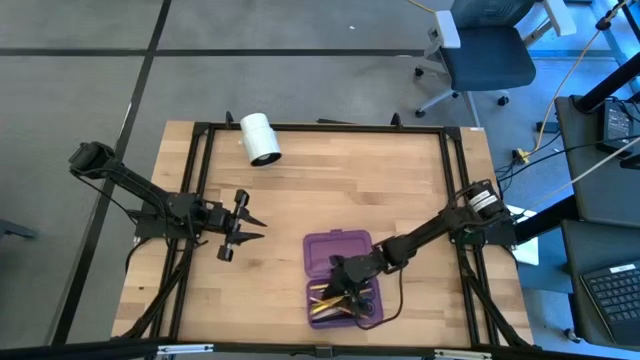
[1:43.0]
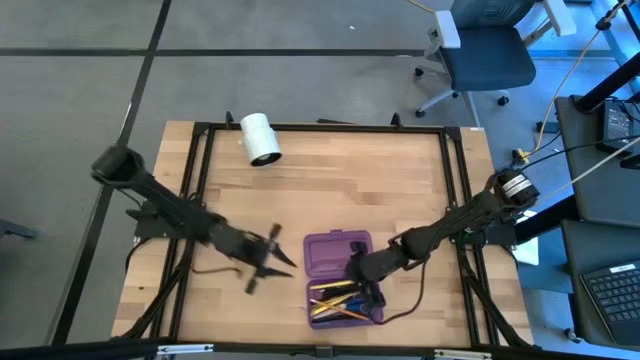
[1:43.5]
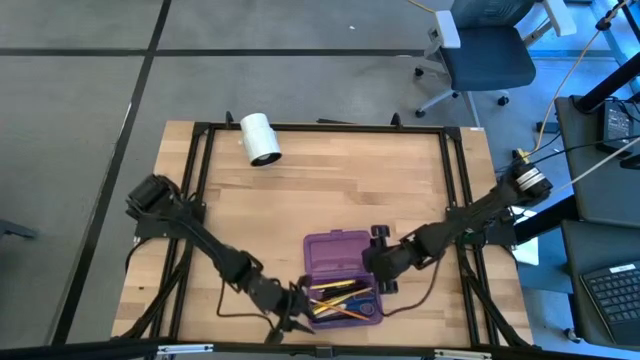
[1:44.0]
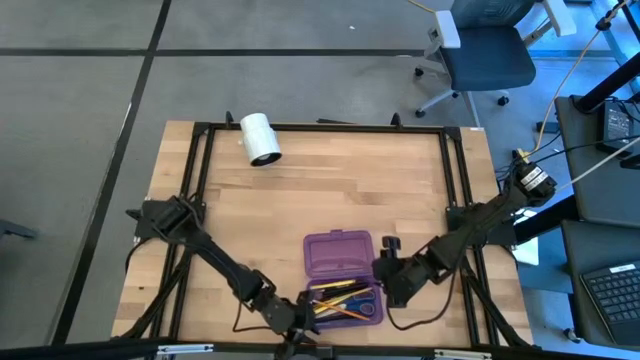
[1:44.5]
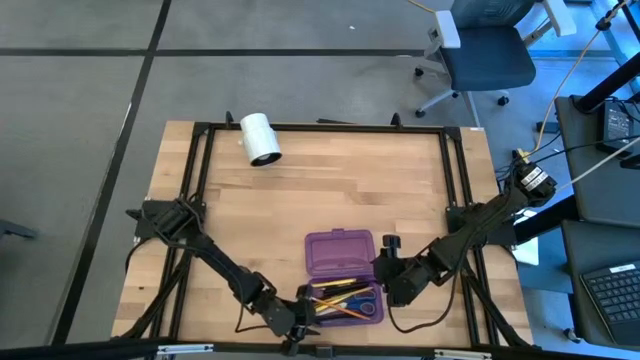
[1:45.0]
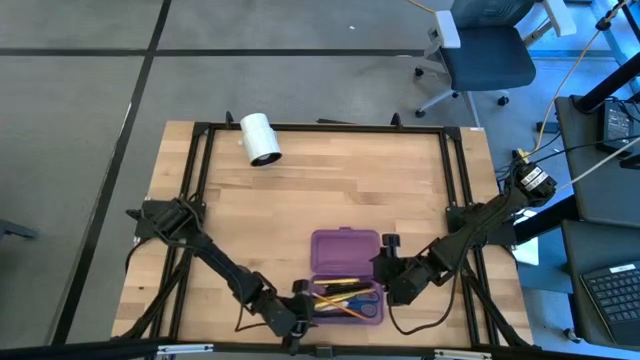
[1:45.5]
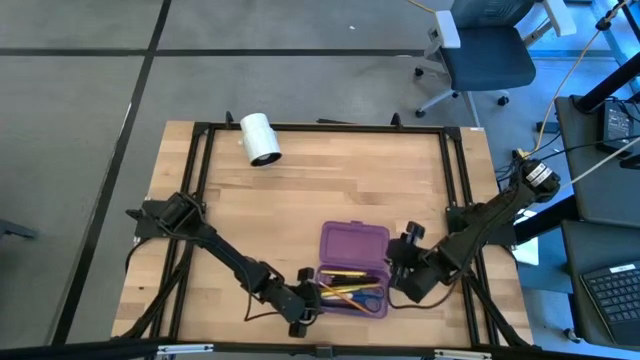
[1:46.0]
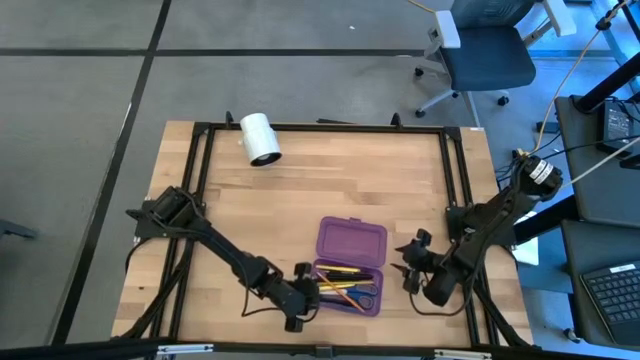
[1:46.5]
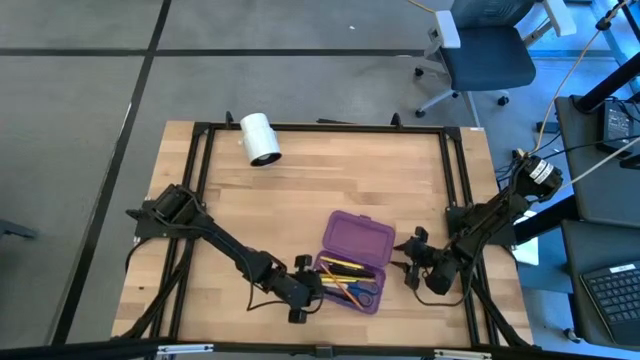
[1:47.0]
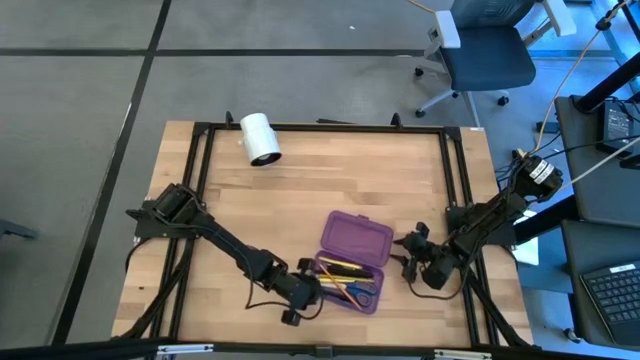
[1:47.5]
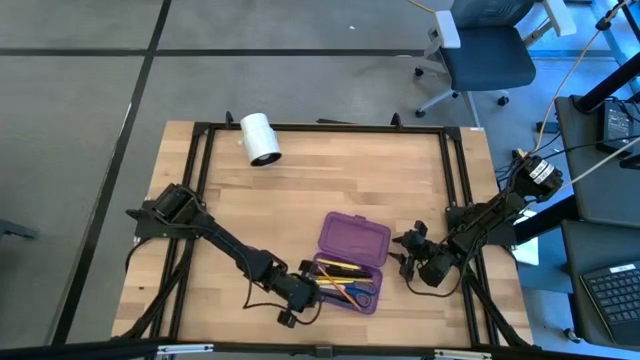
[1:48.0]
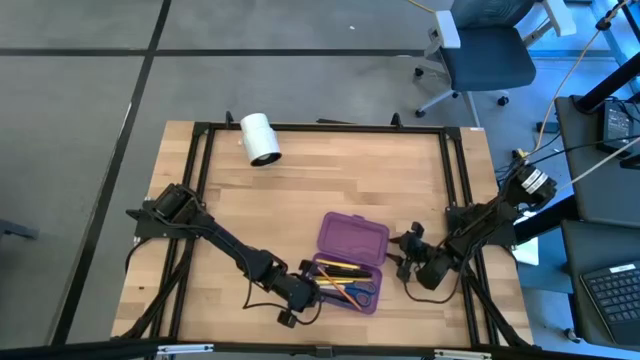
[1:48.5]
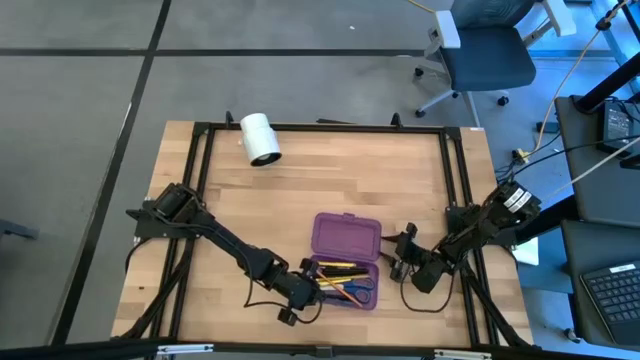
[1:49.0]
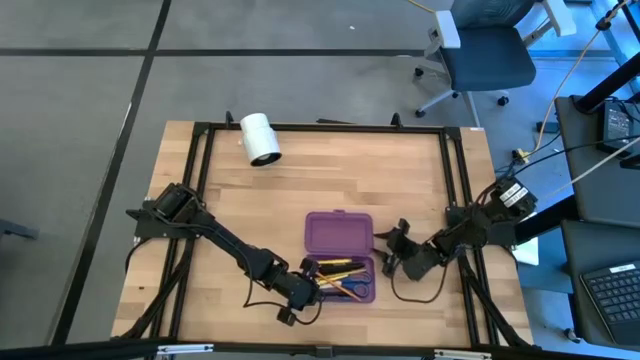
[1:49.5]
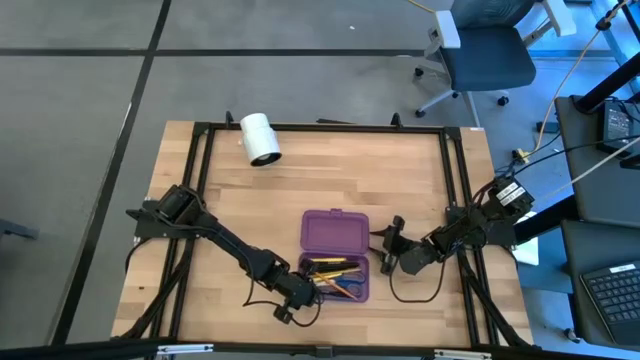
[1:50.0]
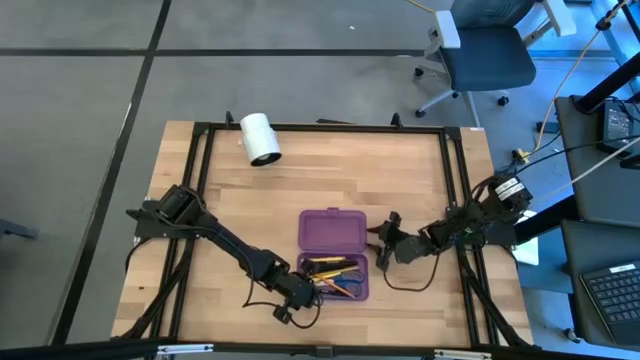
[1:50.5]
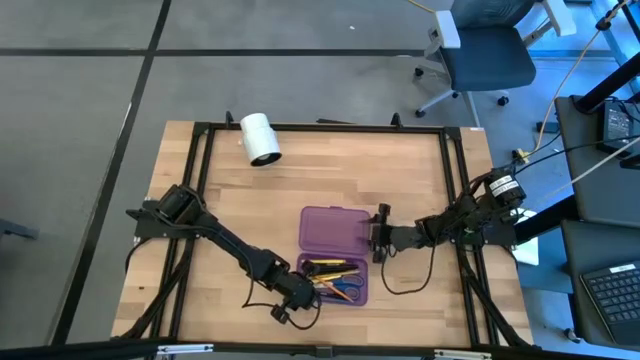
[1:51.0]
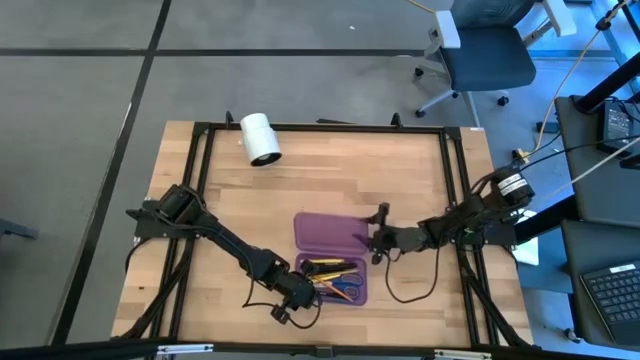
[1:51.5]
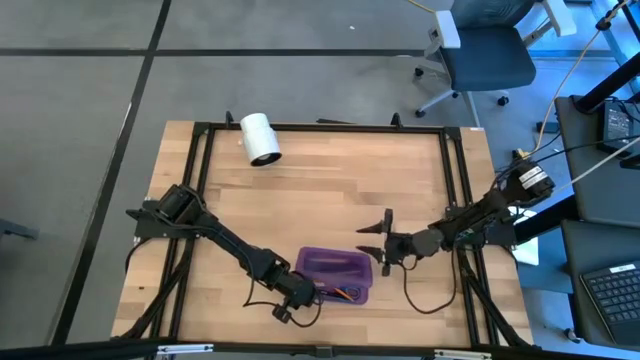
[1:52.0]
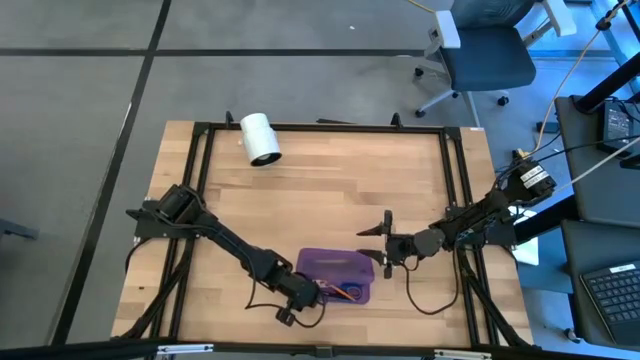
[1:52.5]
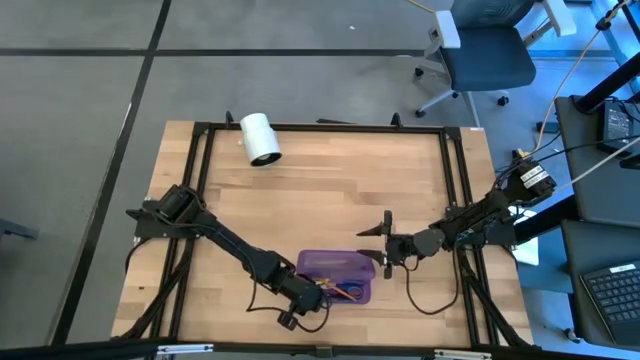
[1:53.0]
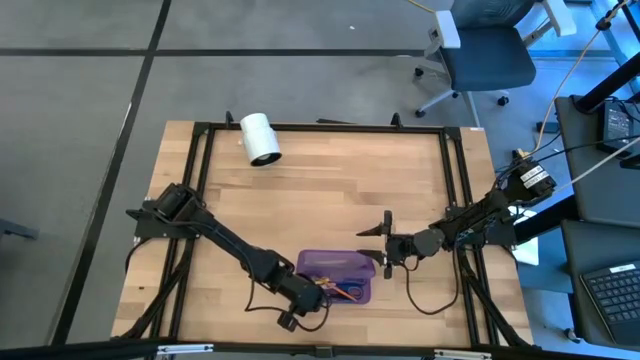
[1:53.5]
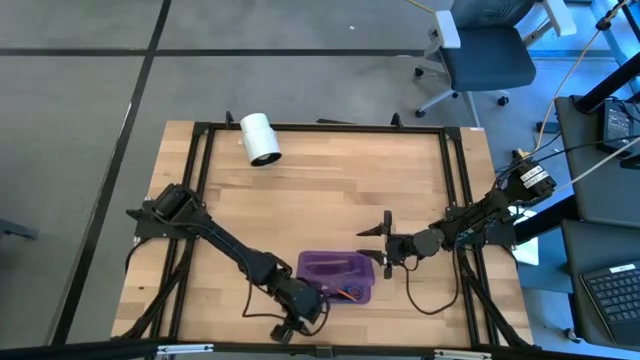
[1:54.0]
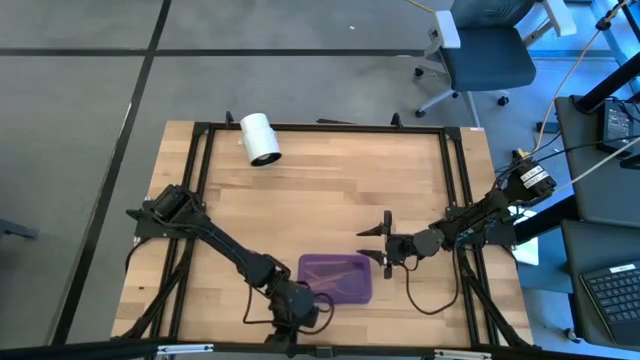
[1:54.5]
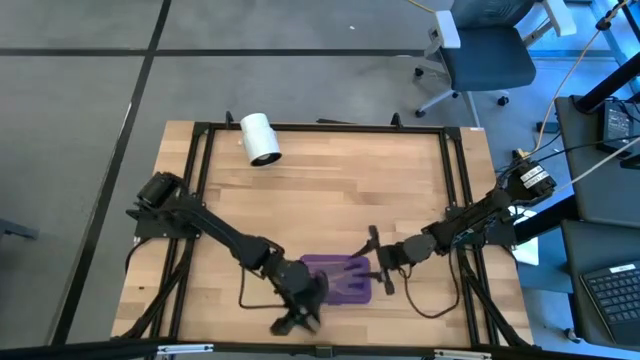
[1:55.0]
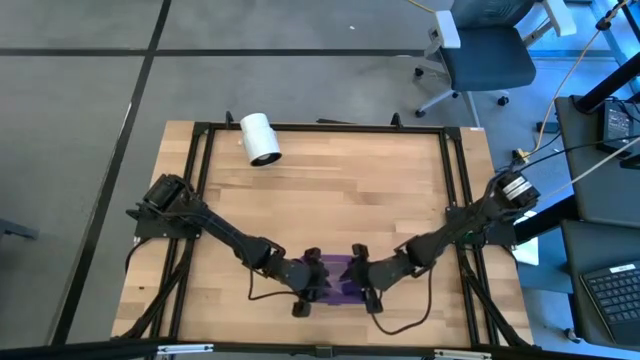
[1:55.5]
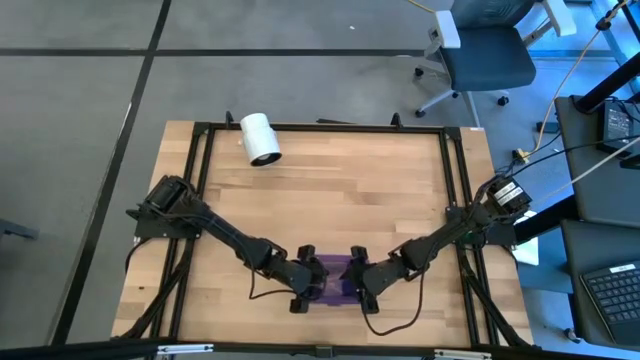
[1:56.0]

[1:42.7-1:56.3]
Task: Pick & place school supplies into a supply box
Close the purple supply box

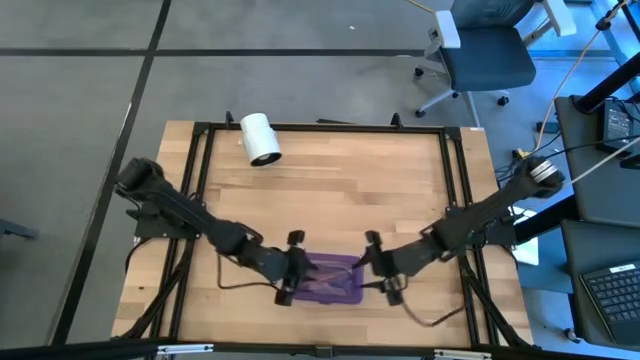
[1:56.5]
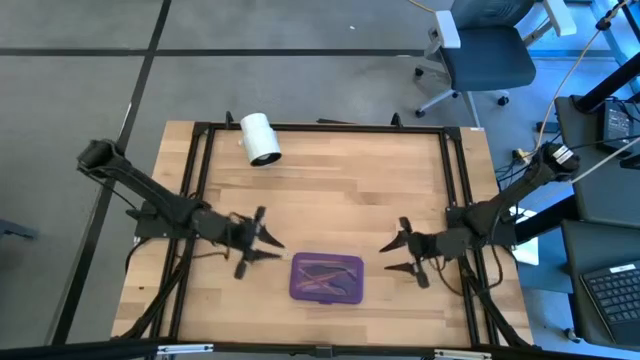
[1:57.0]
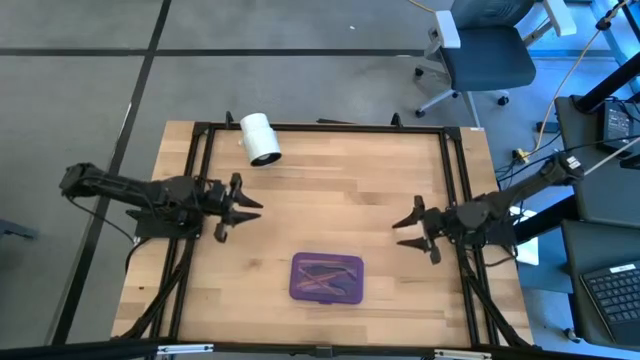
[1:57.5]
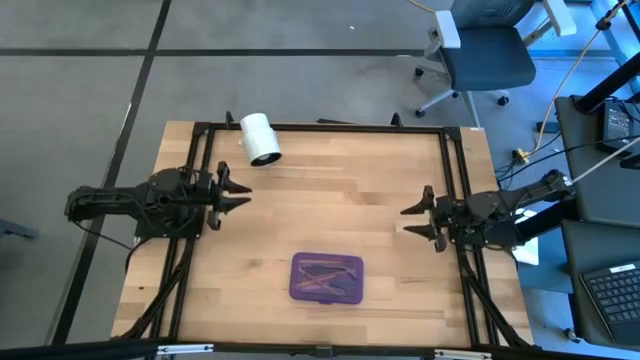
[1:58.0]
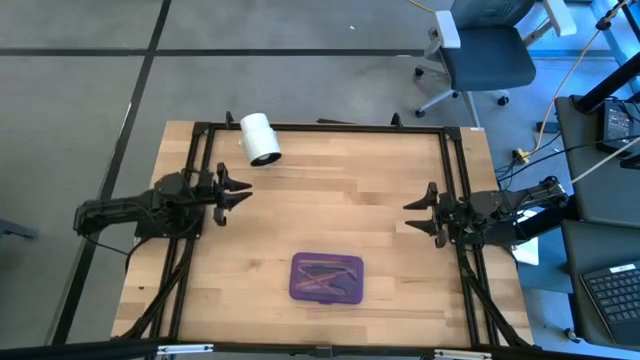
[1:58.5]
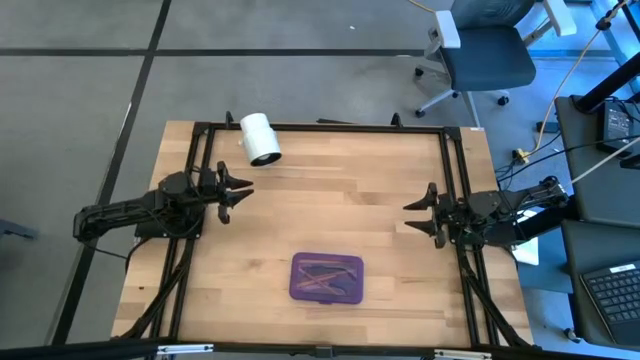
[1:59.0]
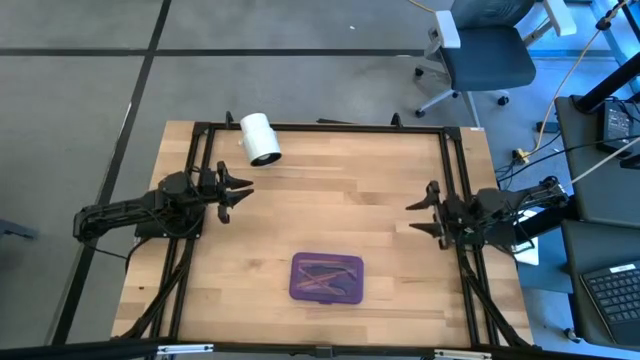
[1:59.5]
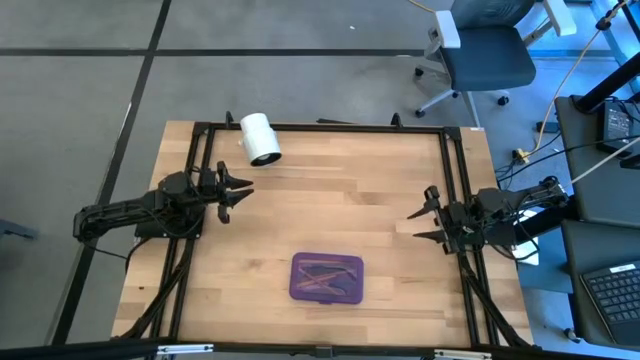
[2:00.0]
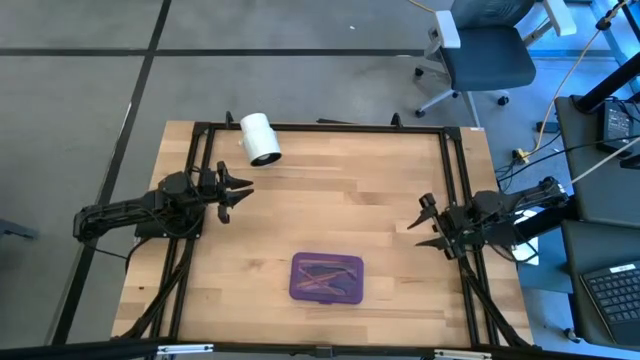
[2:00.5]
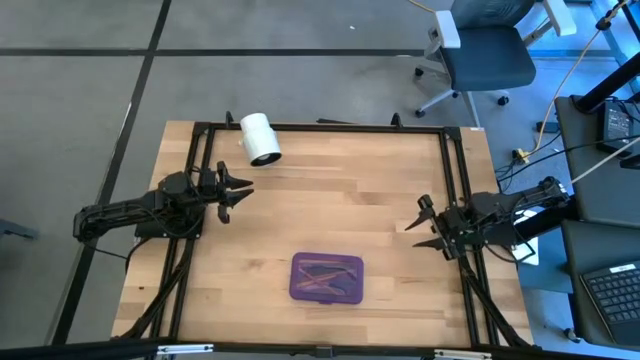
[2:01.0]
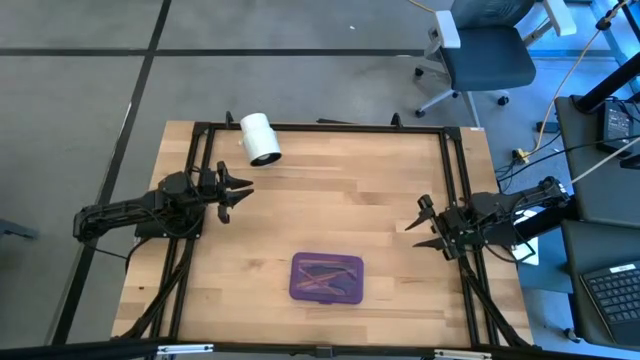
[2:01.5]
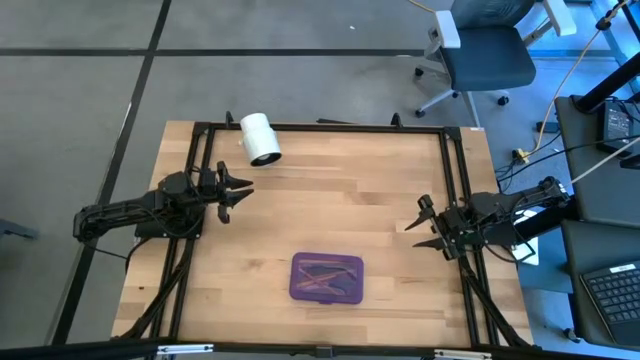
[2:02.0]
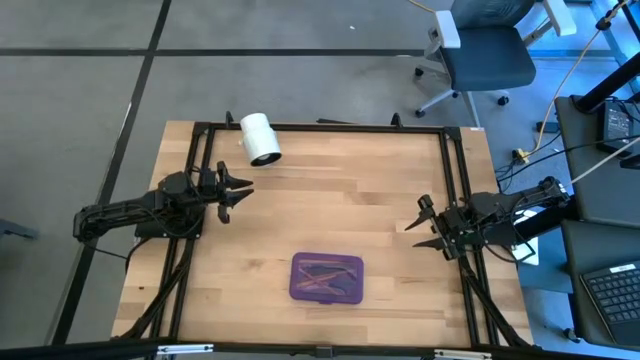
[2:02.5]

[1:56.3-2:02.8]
Return to Home Position
